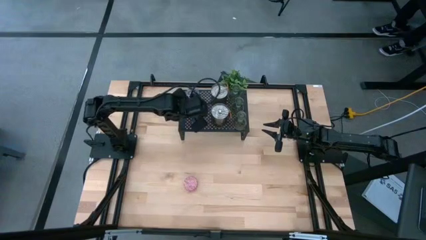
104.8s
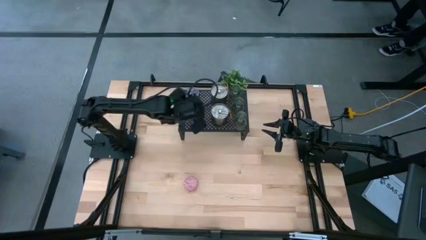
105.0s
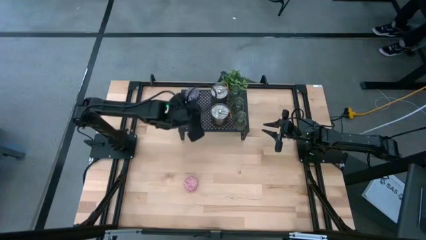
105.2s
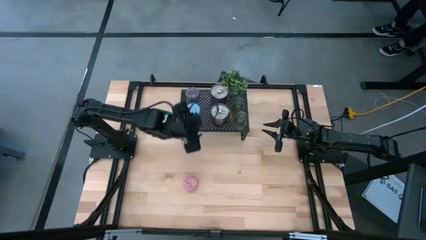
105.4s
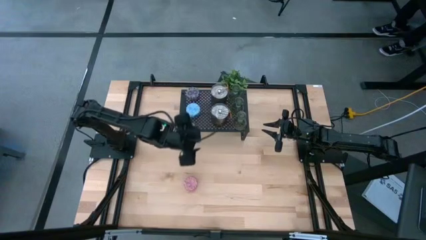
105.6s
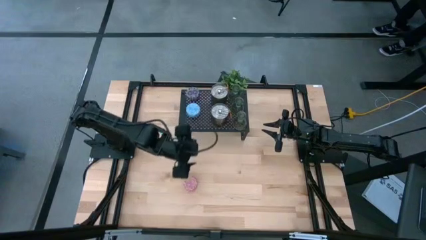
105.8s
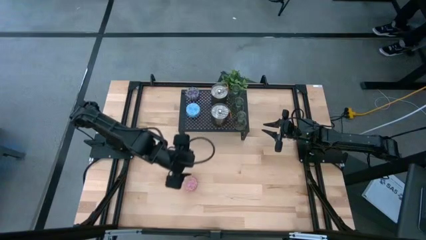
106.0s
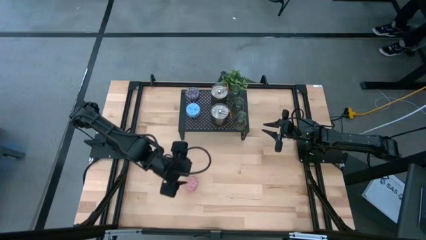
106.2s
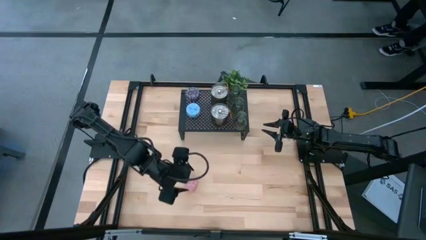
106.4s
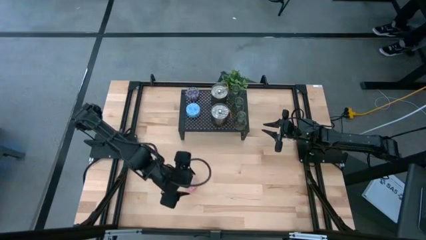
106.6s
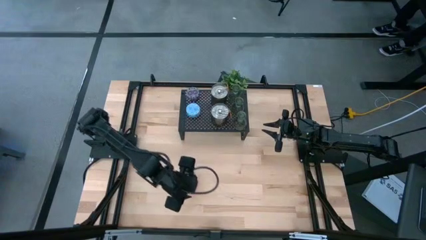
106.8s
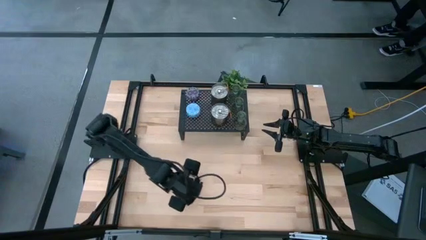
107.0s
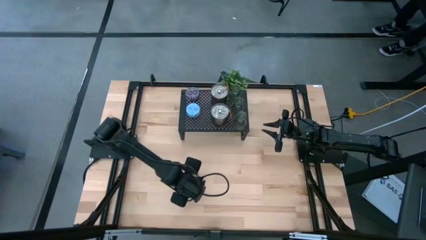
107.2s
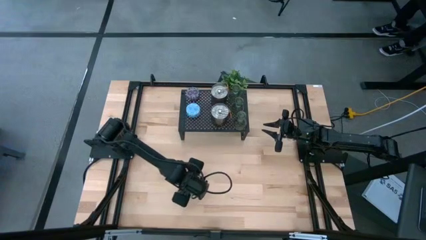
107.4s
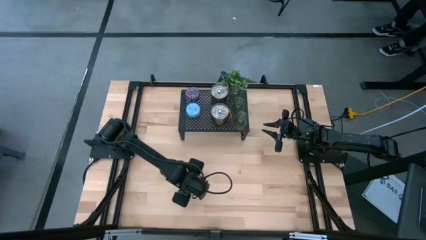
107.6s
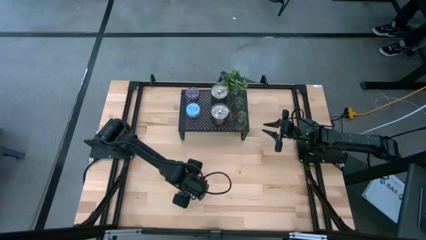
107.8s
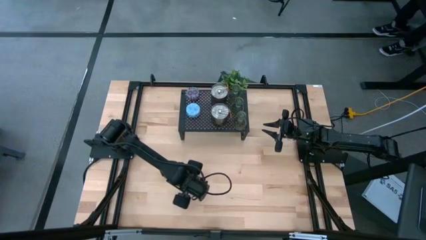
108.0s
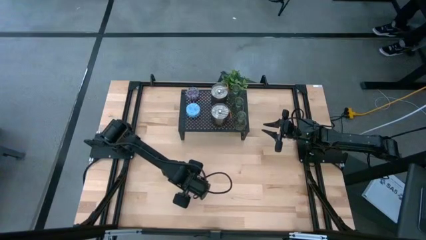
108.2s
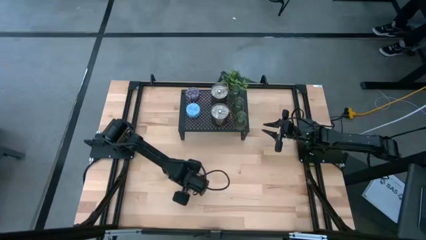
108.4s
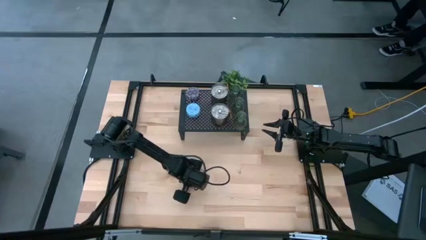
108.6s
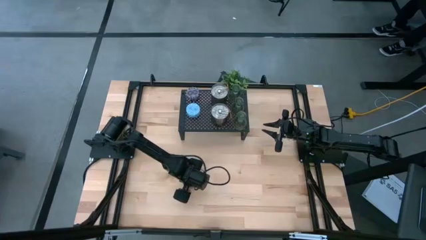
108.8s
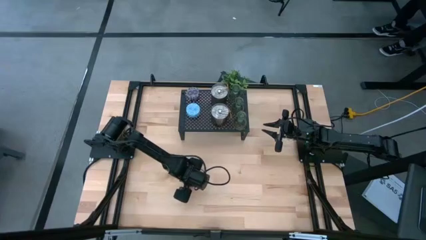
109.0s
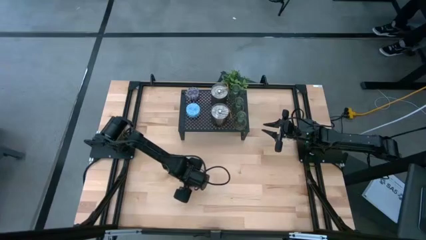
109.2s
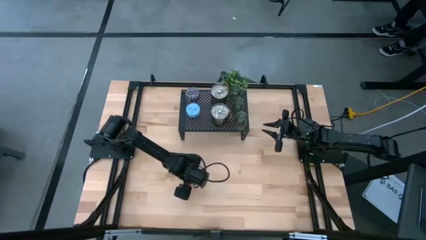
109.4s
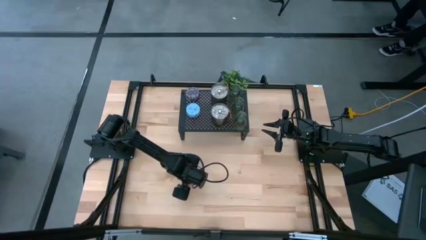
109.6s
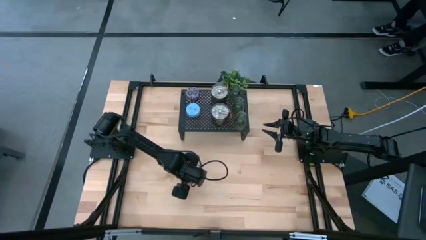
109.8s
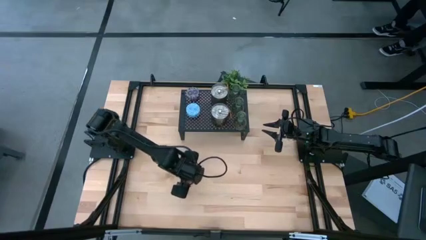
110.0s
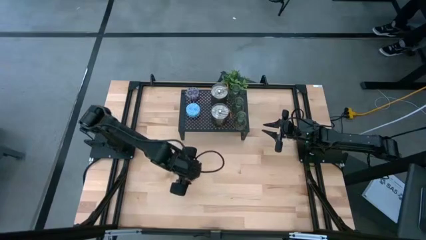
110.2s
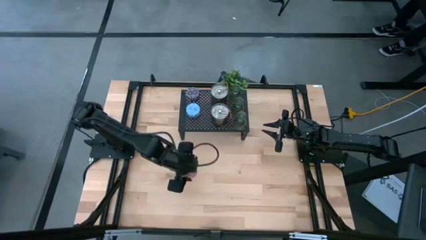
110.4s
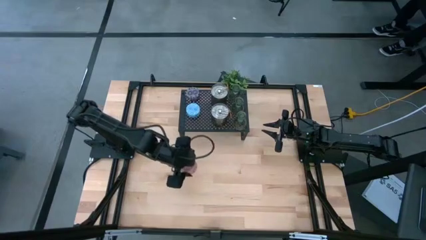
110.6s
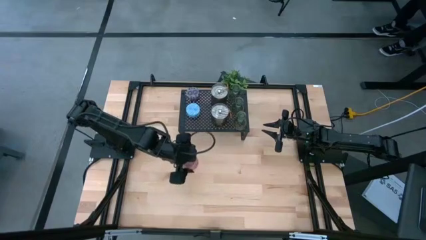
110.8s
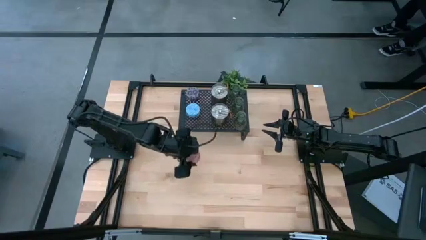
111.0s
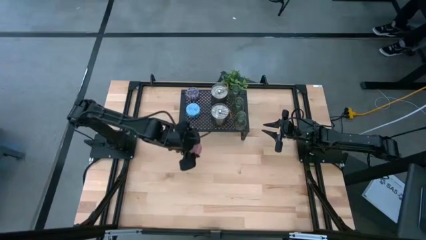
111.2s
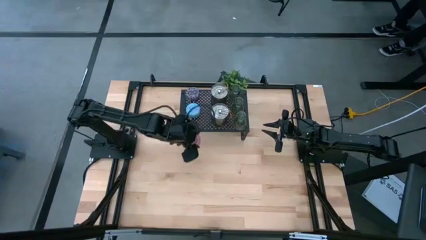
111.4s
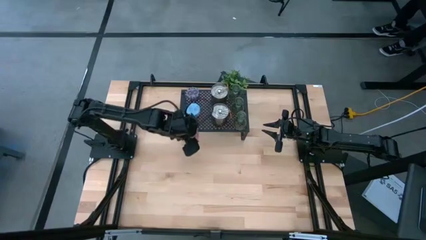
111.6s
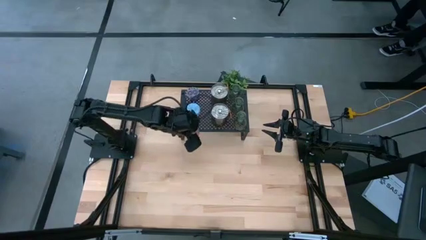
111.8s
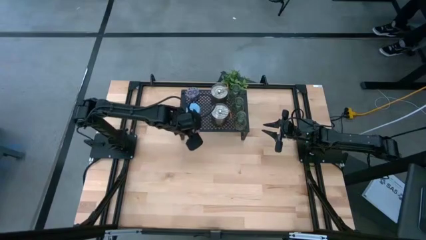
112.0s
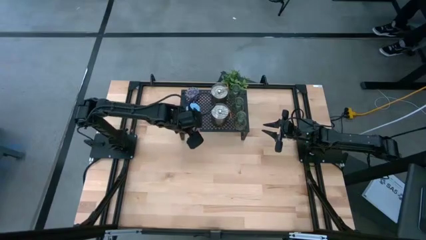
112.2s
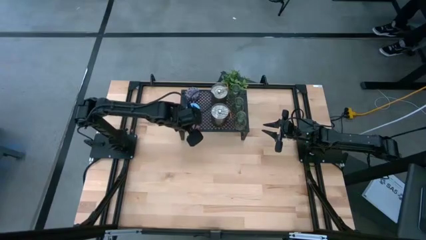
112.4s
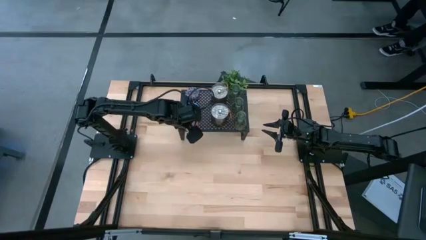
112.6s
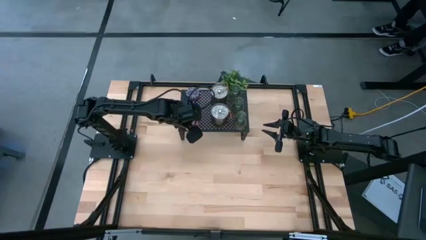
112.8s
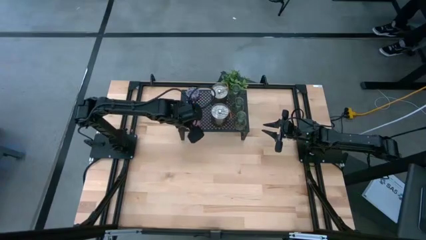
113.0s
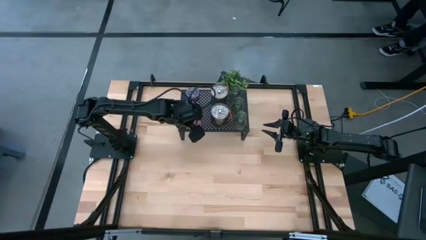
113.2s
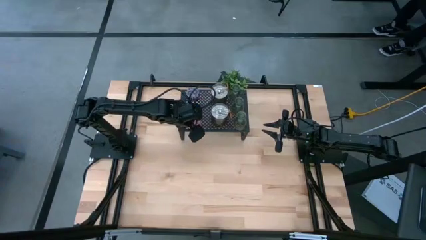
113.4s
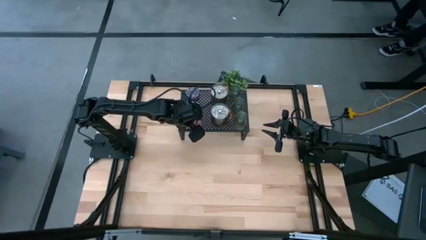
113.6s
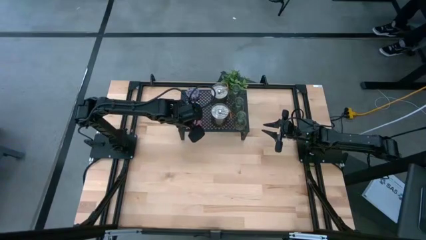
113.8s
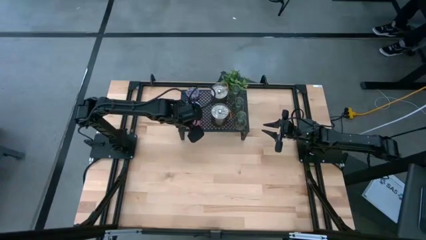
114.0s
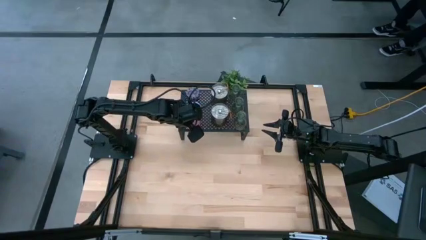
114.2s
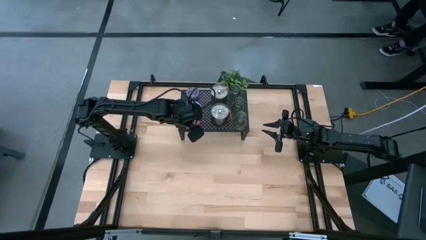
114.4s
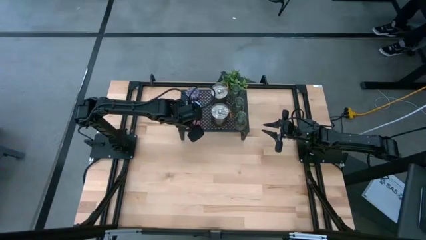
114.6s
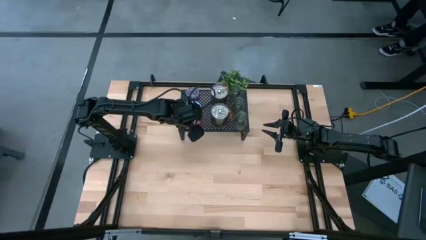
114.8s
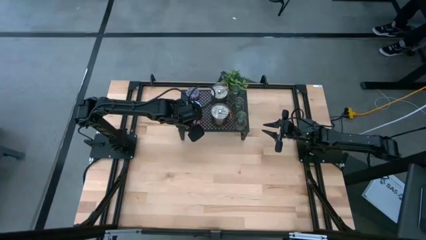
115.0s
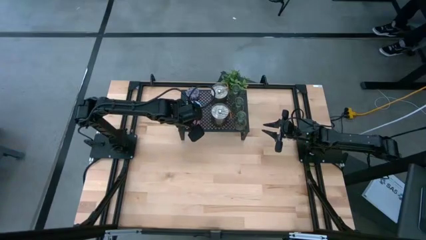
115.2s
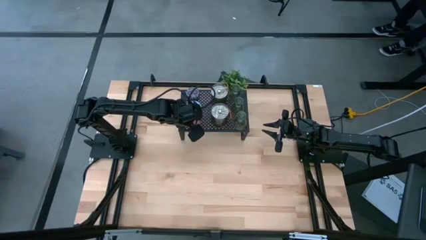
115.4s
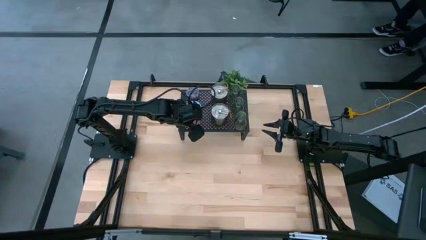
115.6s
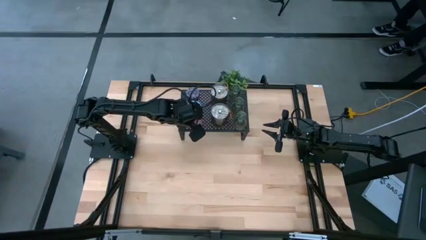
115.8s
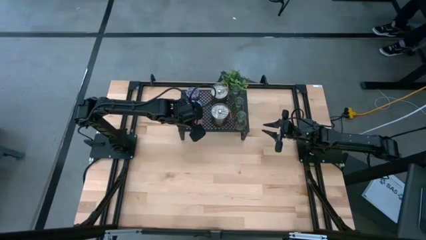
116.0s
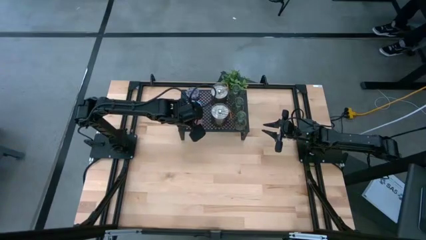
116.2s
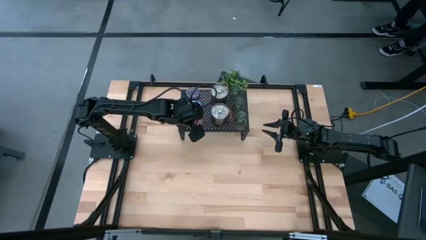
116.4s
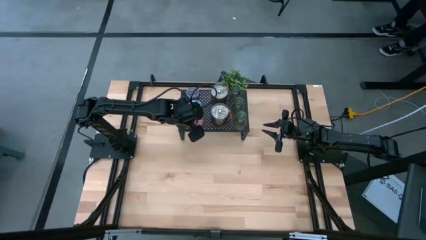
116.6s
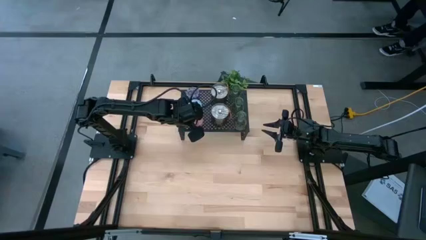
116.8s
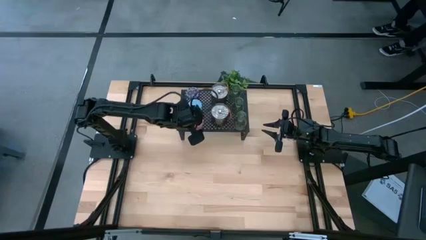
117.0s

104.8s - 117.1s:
Task: Pick & Place candle stick holders
Put the pink patterned scented candle aligned with the blue patterned scented candles on the shelf

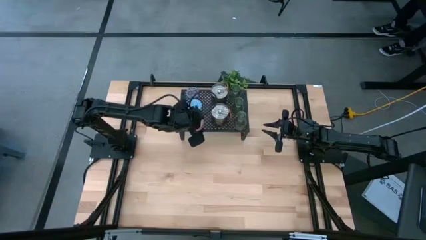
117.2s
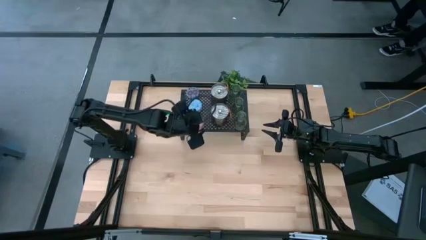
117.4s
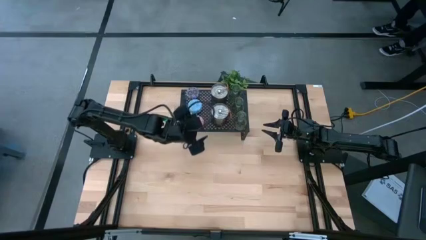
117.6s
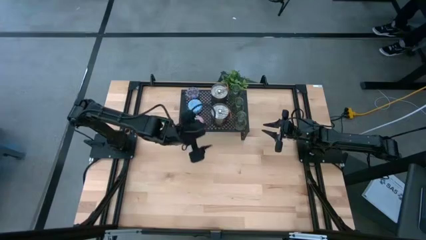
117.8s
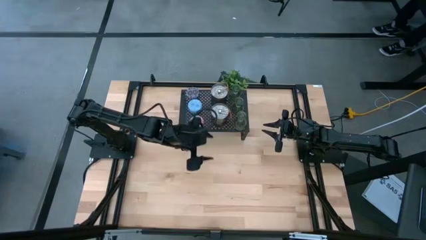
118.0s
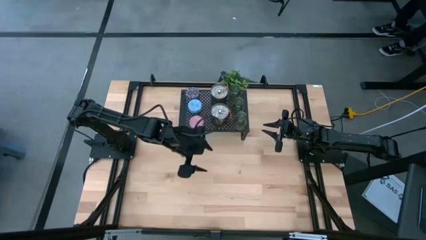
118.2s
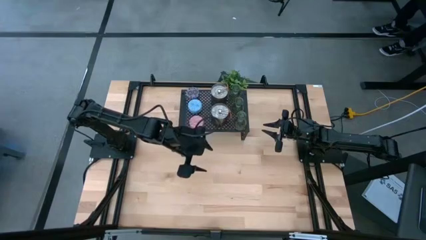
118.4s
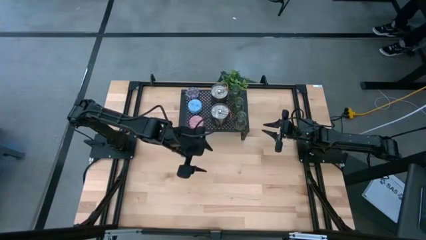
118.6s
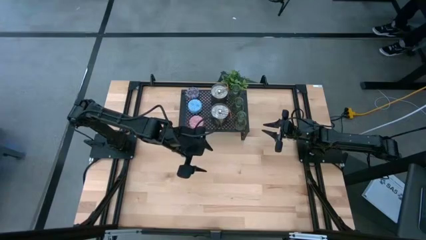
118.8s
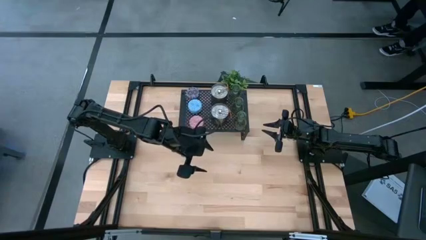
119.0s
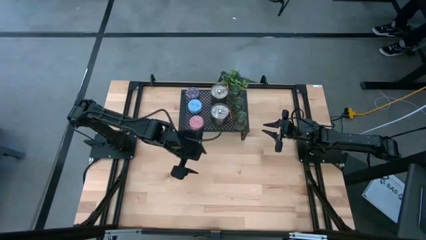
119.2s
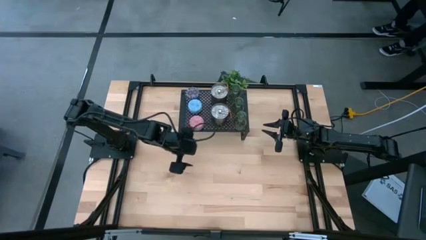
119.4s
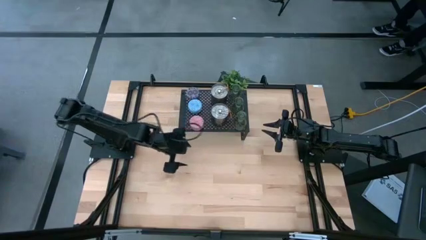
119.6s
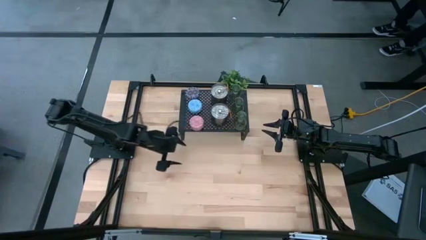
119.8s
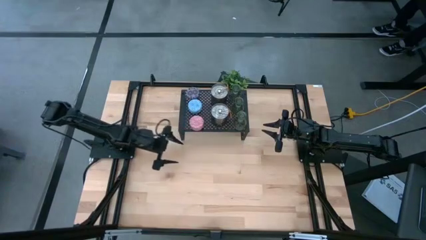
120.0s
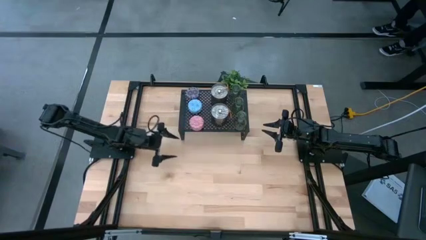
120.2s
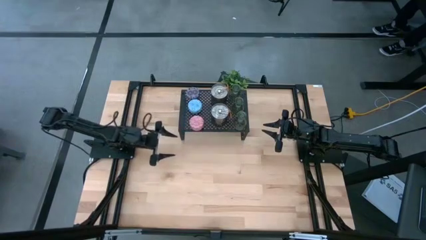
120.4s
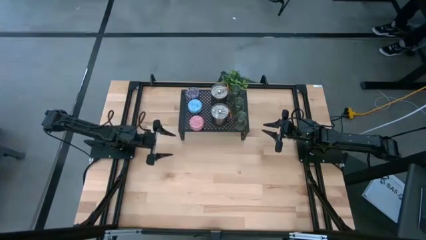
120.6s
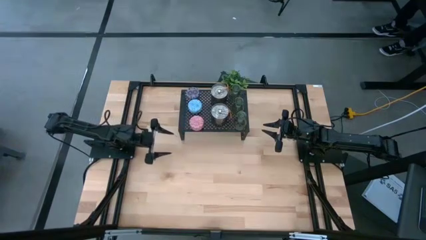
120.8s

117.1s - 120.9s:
Return to Home Position
